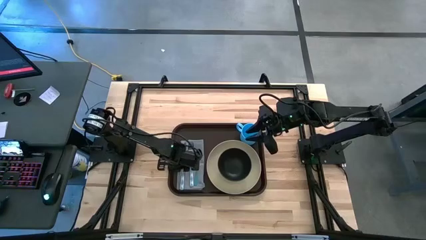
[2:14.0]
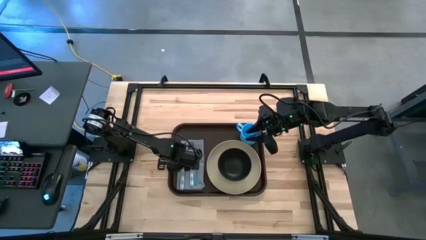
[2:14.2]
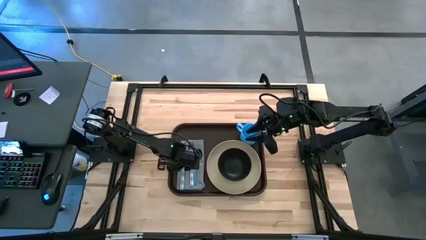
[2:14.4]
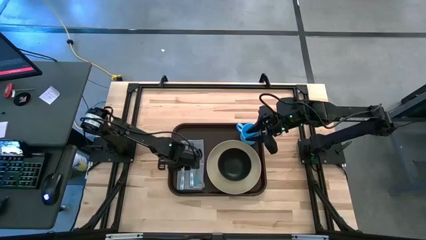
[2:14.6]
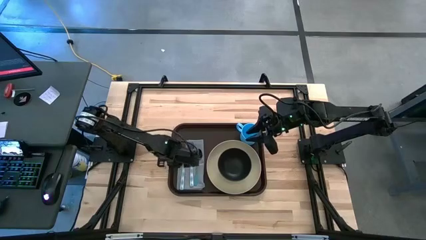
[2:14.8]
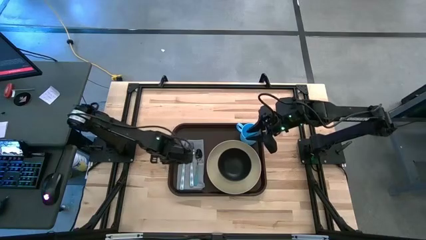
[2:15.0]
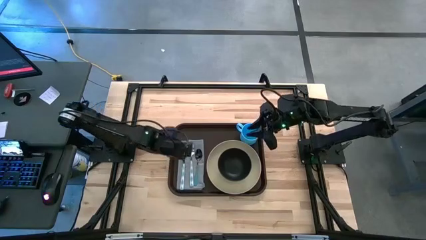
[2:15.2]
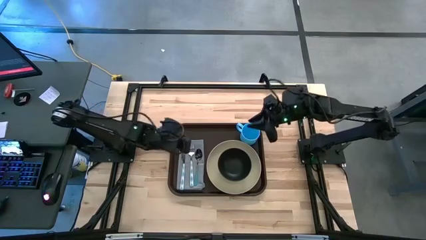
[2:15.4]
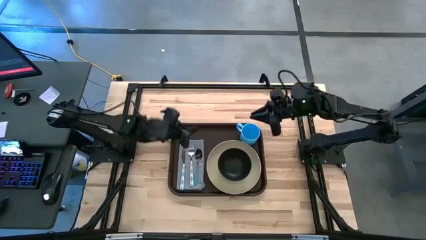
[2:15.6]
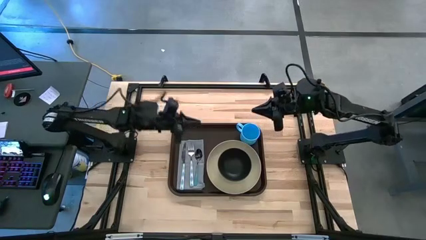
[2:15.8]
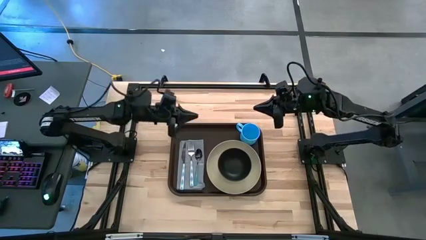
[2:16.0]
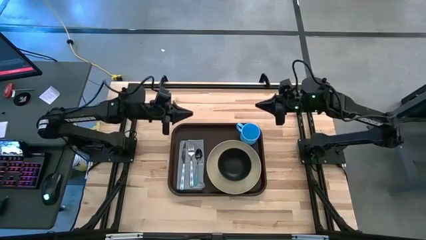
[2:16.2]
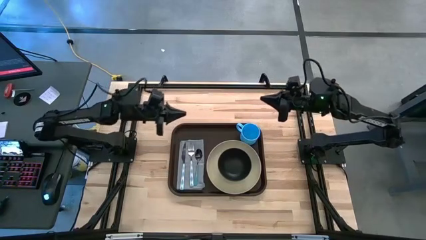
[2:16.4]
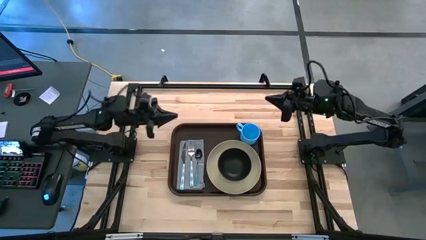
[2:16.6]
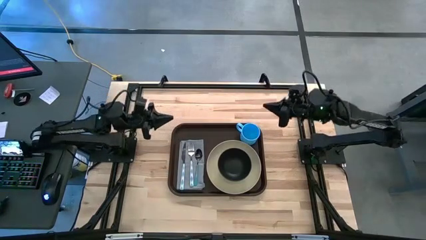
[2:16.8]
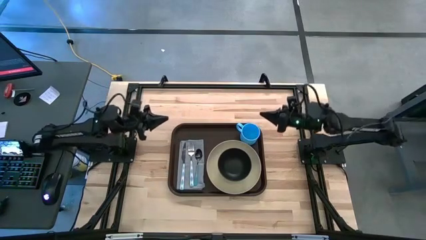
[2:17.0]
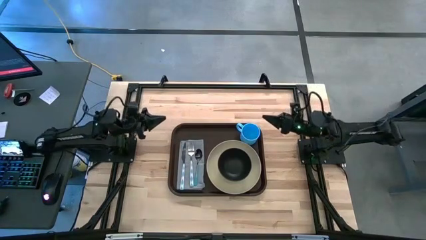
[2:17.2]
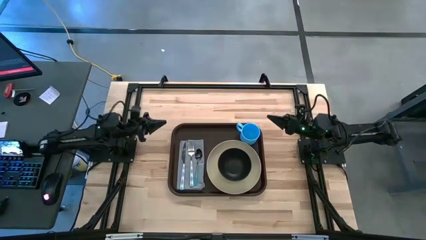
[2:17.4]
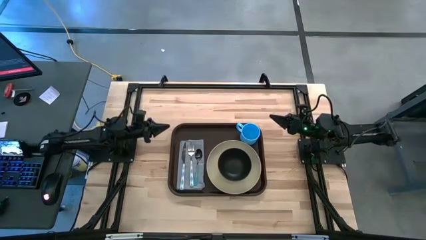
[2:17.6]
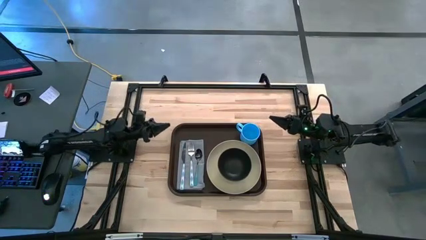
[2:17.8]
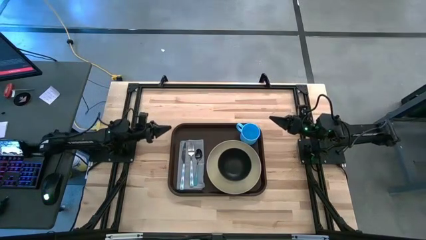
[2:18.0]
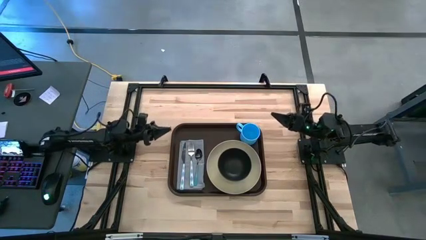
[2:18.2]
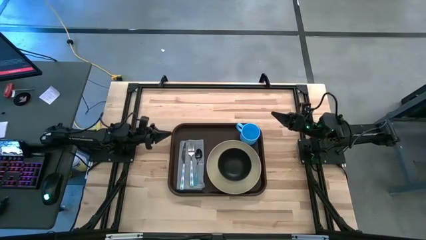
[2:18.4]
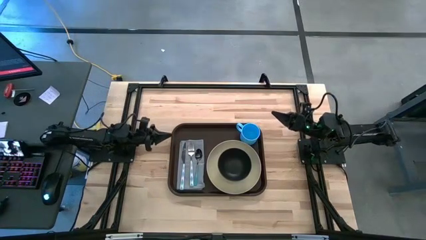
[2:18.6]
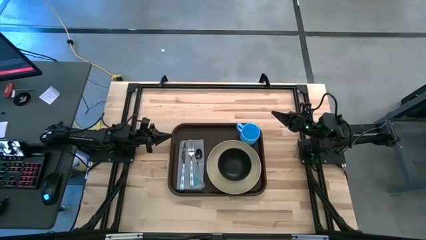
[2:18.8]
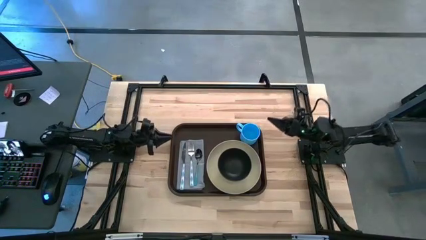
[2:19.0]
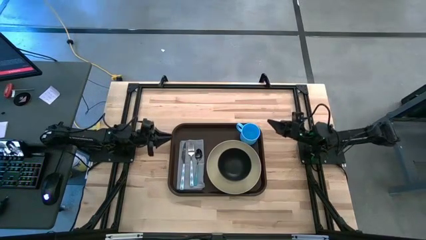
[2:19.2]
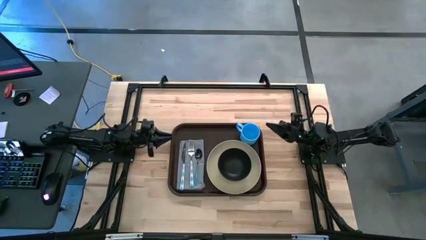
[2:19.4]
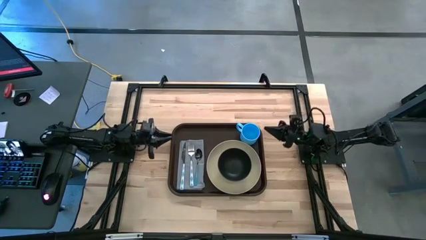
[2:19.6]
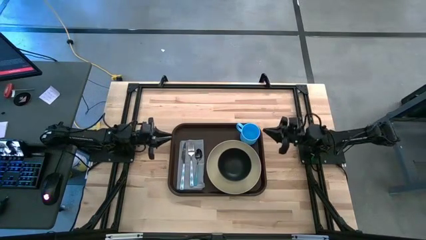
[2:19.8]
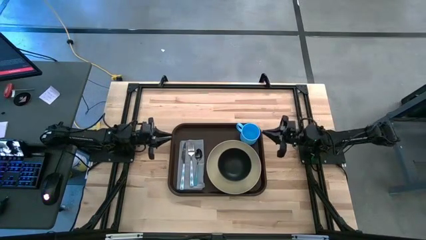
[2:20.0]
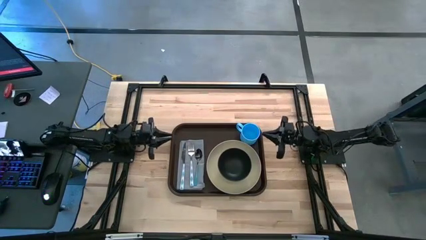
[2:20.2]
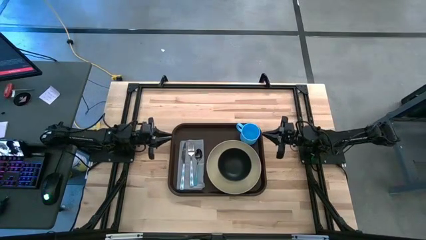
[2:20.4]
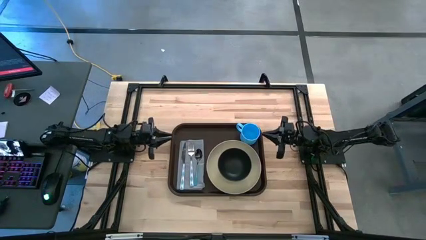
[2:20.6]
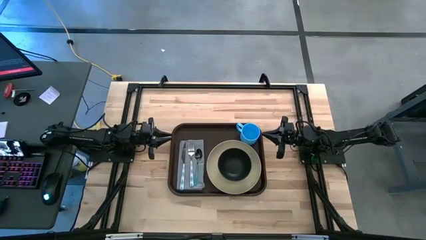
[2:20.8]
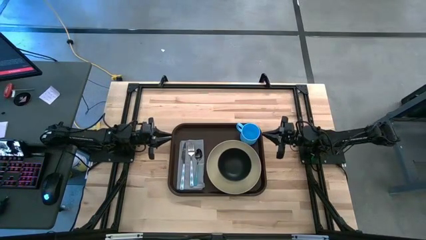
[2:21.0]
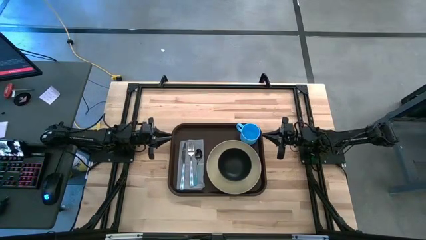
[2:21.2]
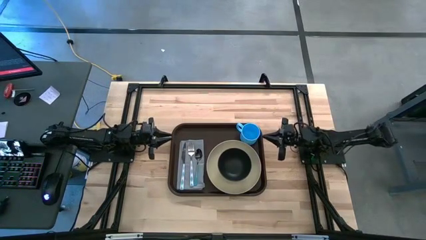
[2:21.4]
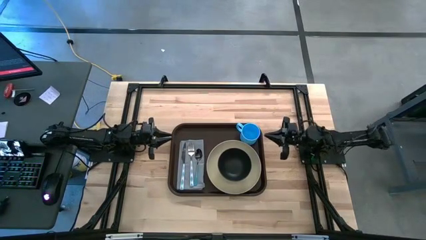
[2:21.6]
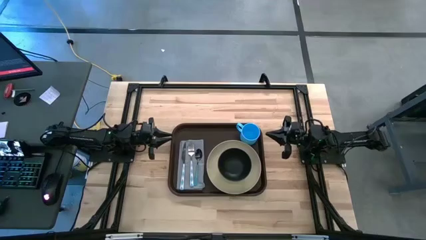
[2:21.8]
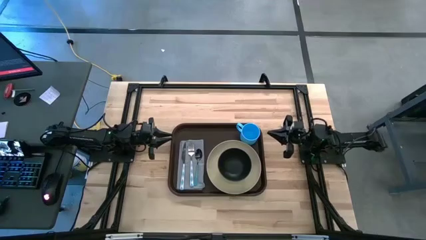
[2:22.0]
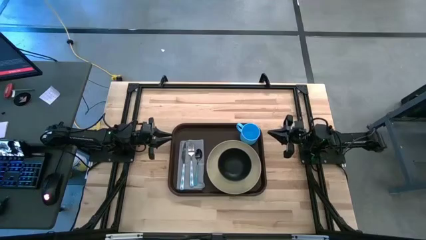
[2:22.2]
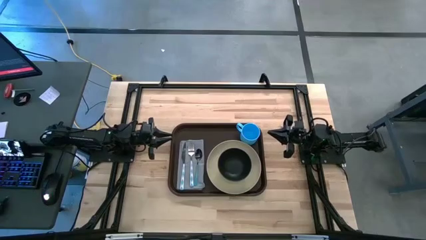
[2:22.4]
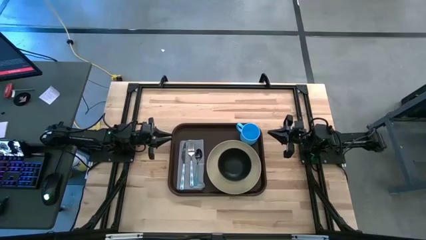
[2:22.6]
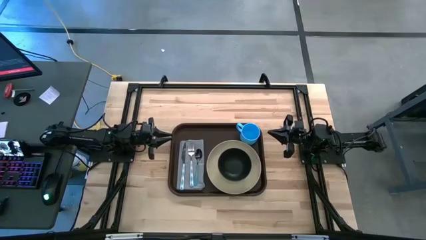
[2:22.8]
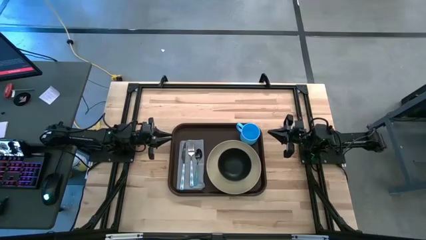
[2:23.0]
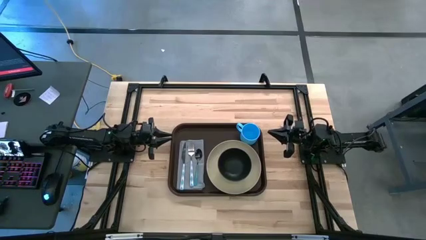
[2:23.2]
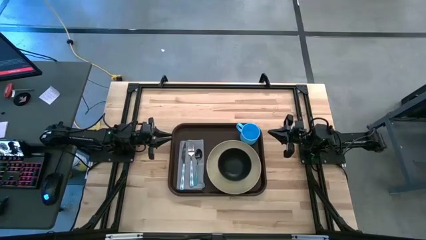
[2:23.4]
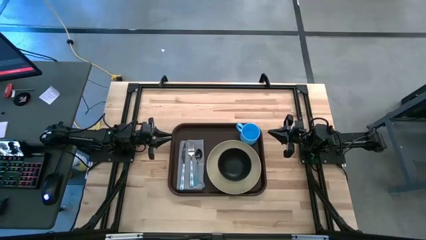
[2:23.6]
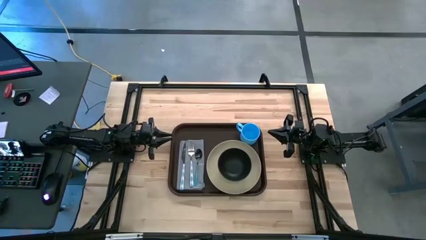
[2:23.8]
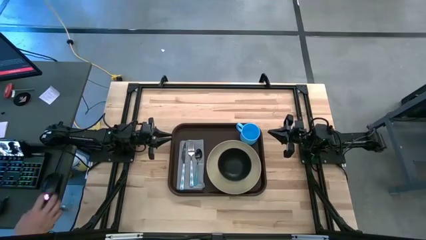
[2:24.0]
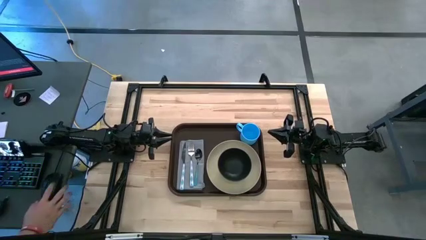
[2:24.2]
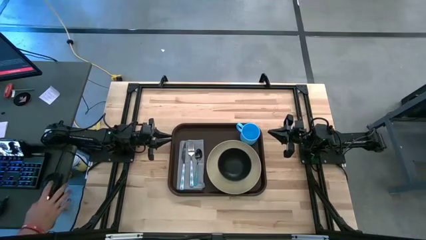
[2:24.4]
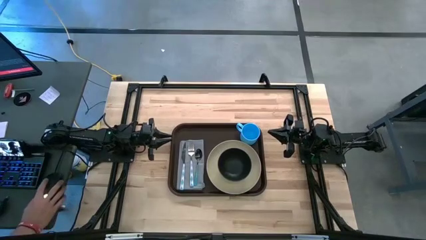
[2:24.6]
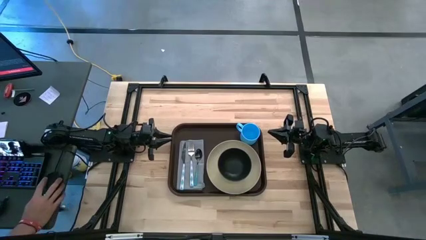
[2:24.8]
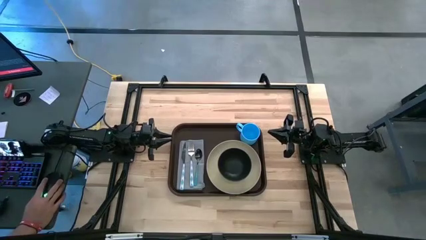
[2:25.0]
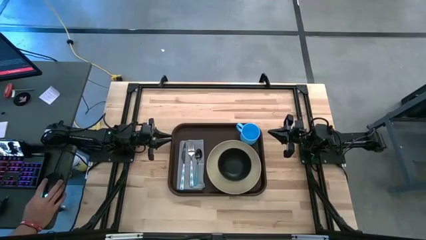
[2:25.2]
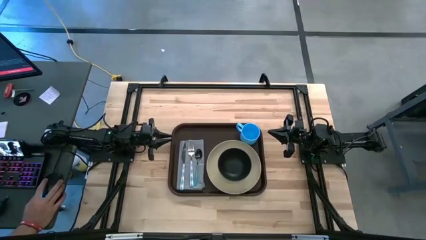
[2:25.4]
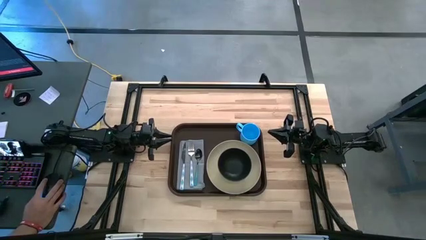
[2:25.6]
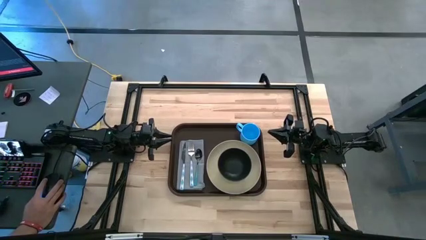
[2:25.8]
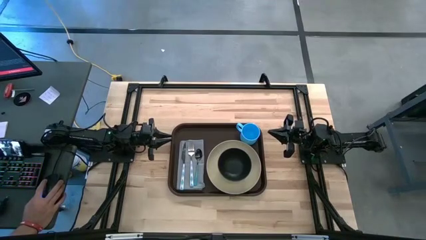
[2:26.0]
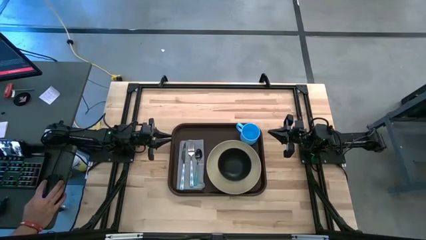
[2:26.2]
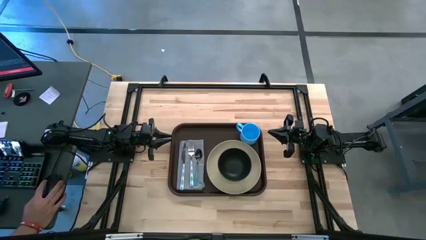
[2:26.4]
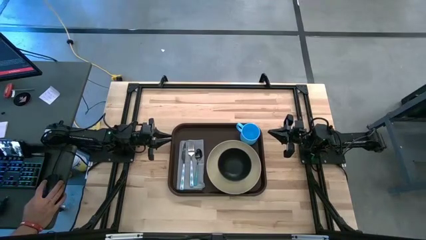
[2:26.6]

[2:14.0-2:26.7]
Task: Set up tray
Return to Home Position

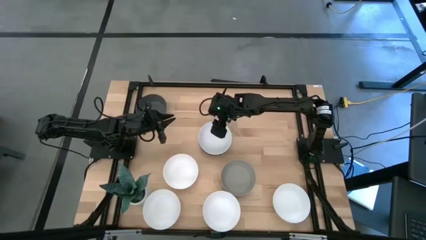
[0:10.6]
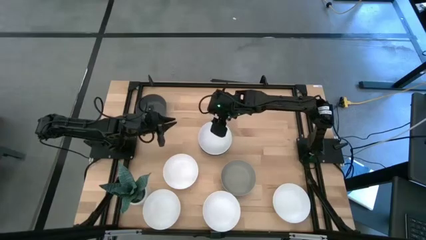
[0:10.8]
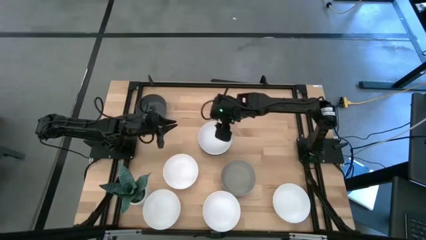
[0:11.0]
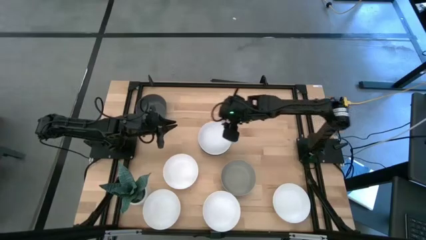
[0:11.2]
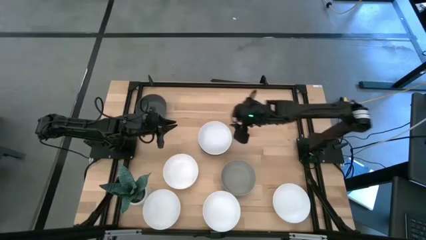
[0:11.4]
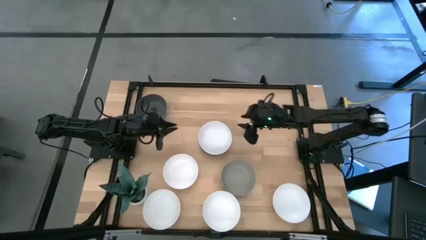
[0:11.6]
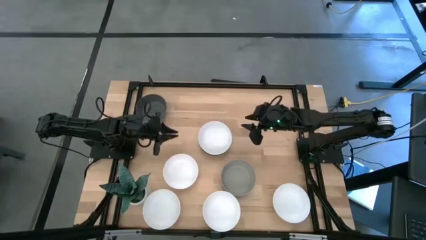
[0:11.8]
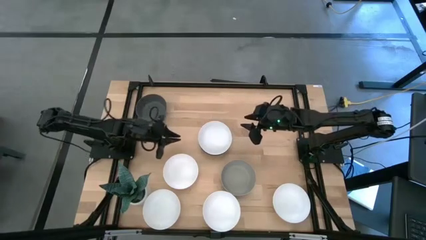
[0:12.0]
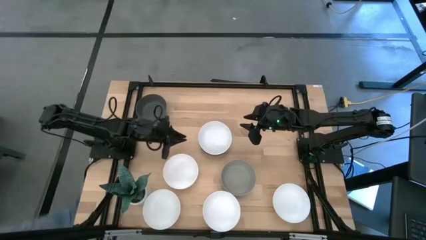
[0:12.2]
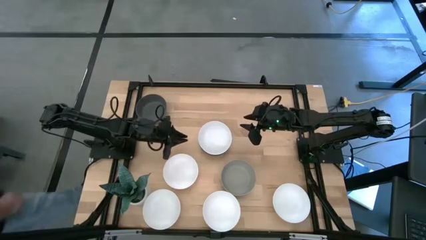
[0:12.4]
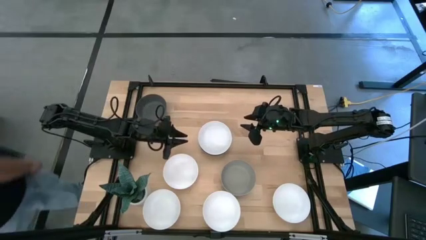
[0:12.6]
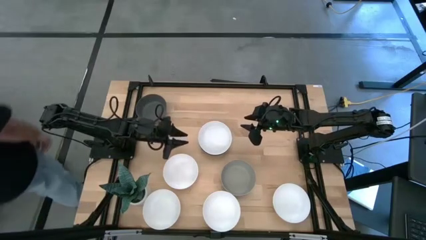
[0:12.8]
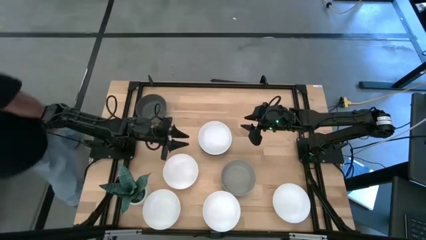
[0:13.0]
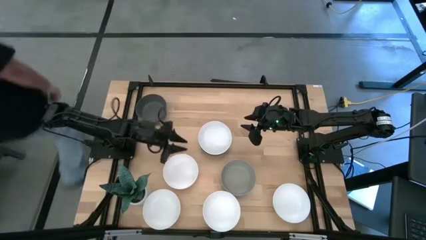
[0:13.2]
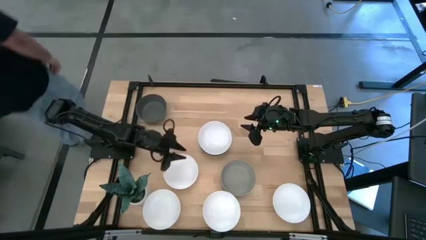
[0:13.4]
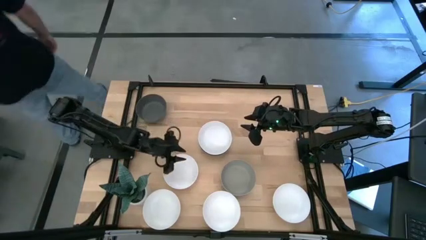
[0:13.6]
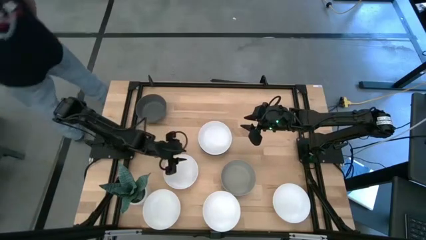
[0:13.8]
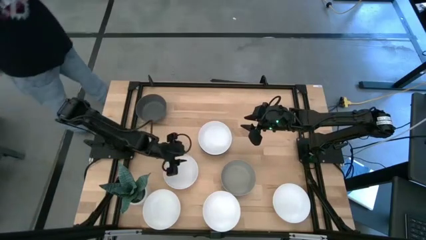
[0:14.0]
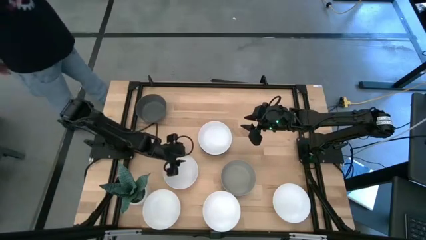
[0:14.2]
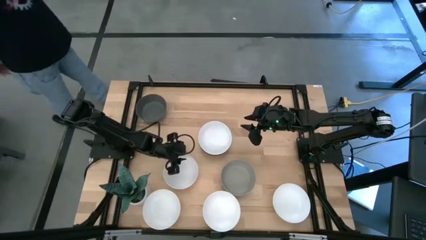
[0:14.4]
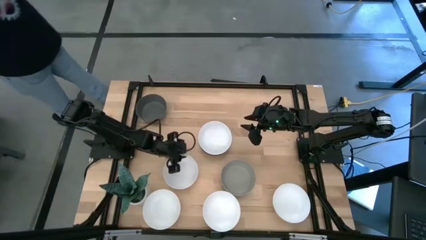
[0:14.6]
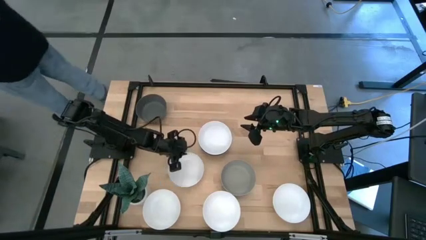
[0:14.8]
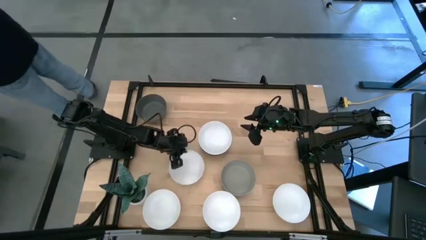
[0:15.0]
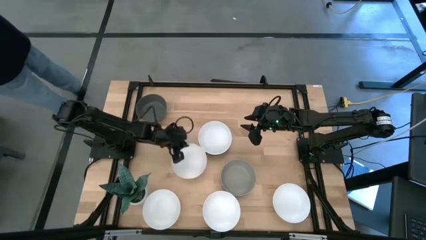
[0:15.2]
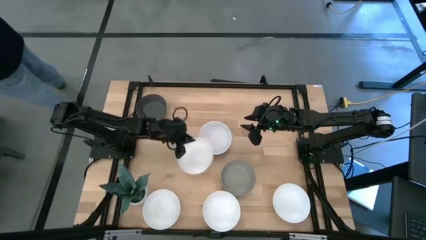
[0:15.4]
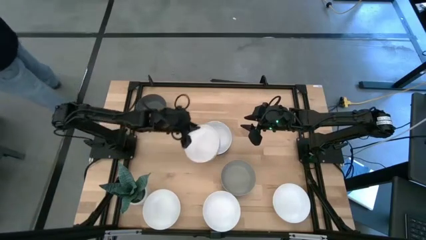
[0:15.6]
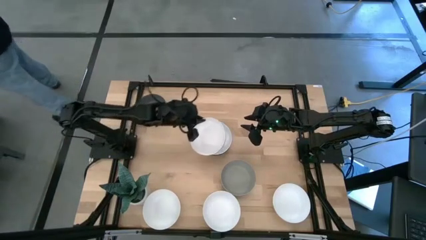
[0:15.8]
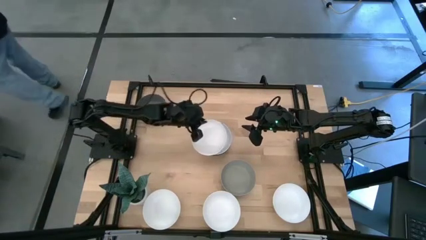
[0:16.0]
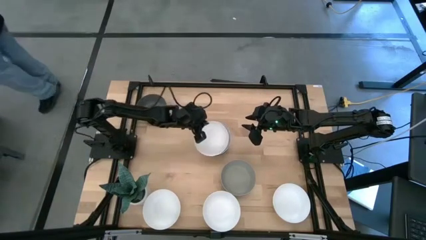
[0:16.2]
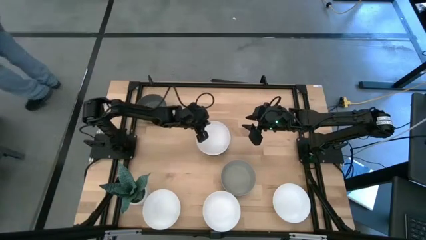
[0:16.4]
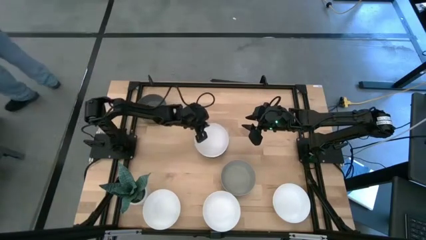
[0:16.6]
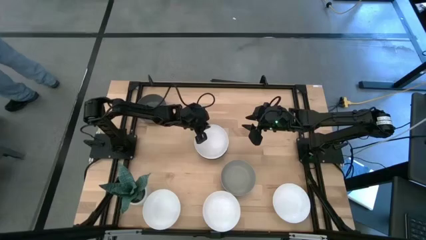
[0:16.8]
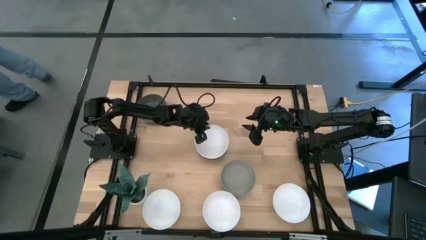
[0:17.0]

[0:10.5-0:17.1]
Task: Nest bowls inside each other
Stack the white bowl on top of the white bowl
